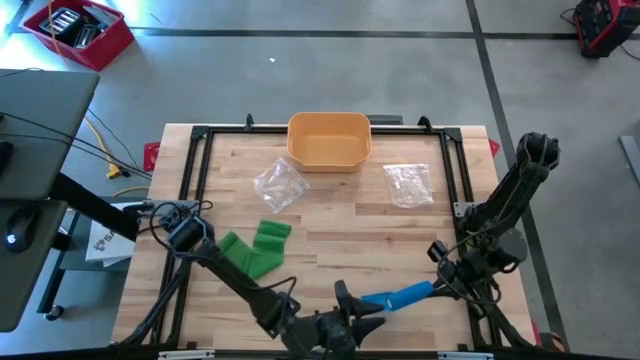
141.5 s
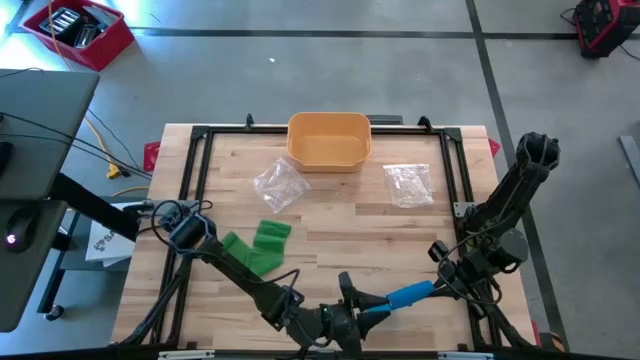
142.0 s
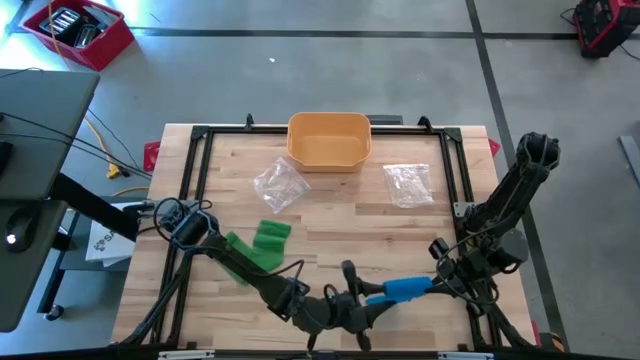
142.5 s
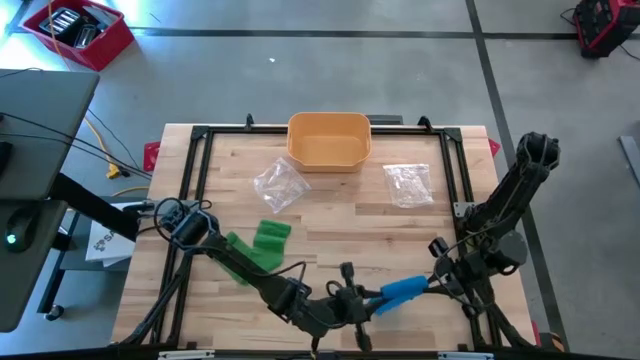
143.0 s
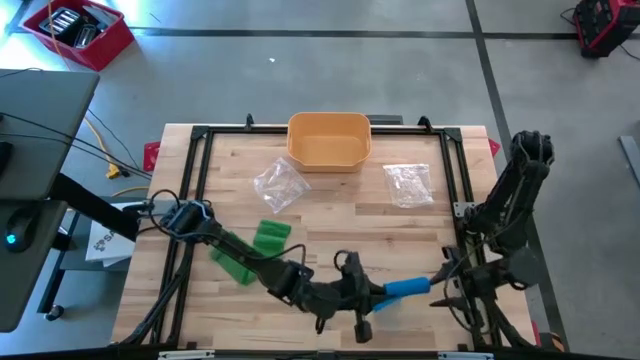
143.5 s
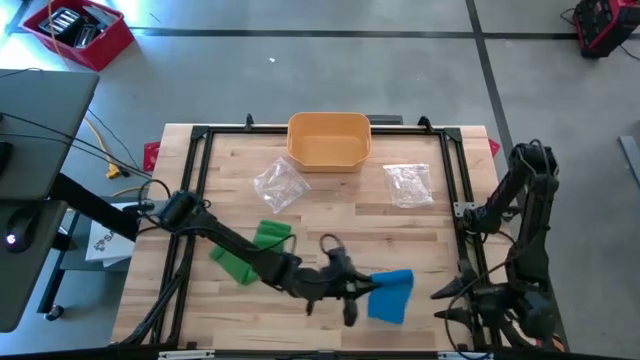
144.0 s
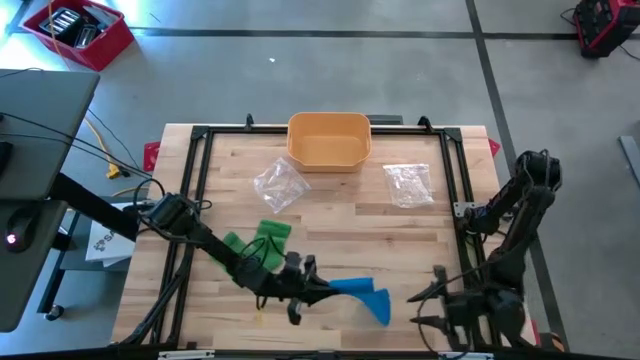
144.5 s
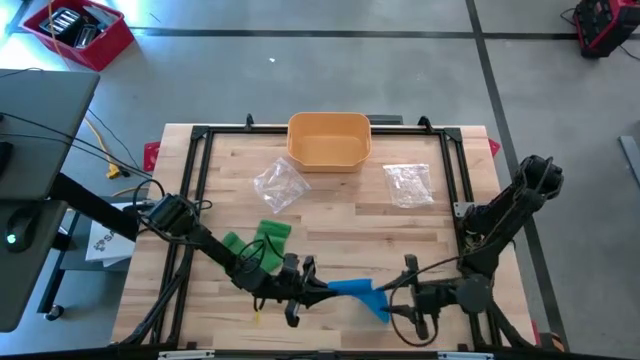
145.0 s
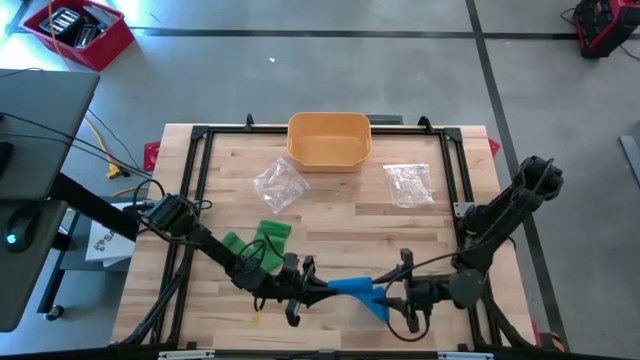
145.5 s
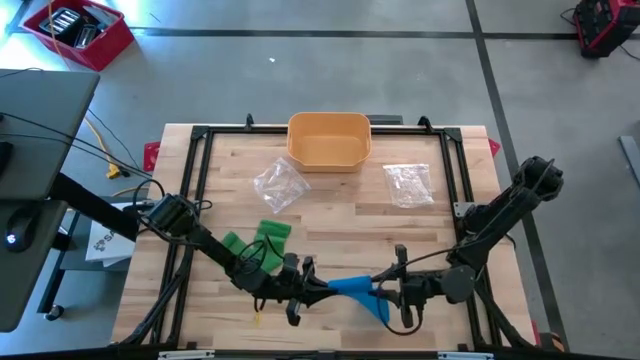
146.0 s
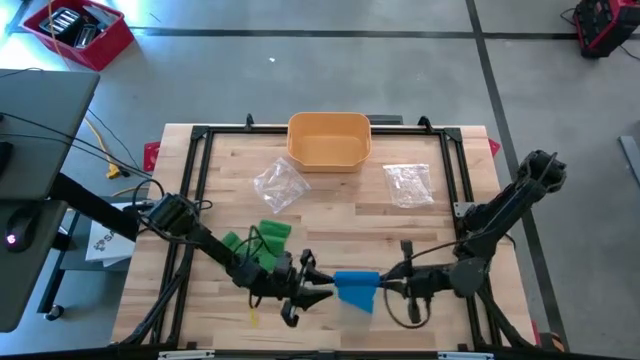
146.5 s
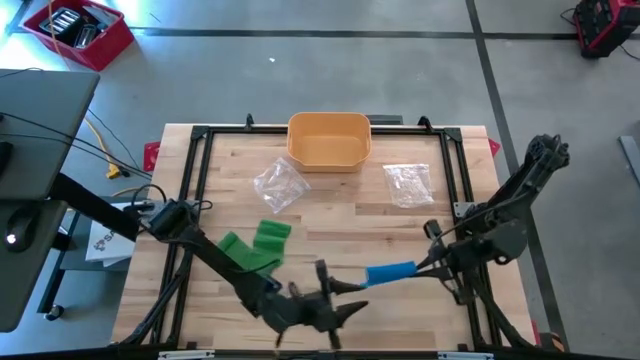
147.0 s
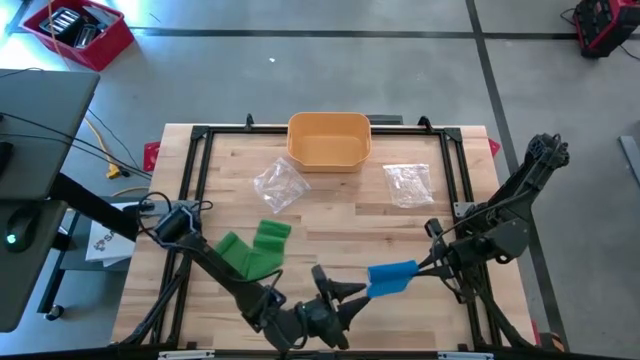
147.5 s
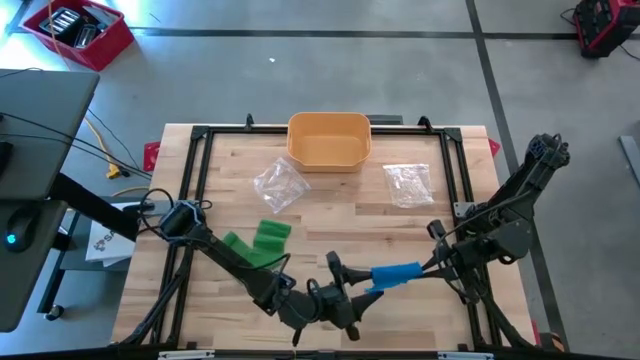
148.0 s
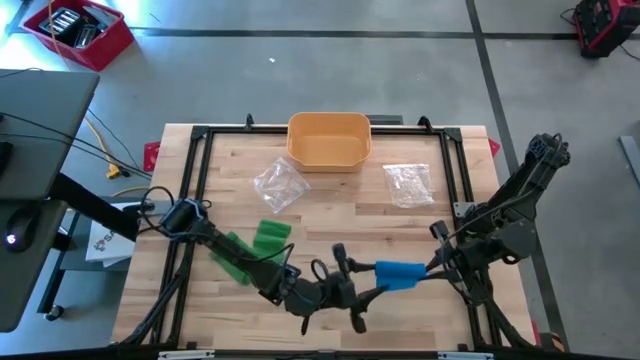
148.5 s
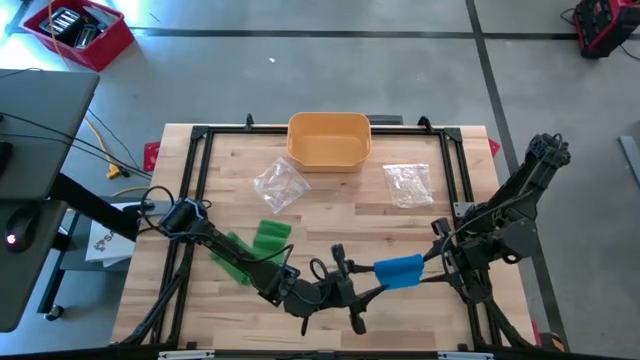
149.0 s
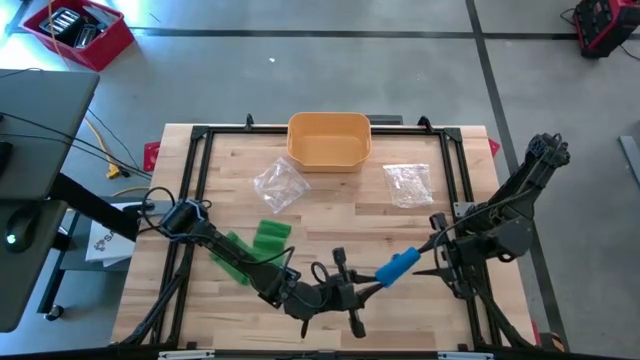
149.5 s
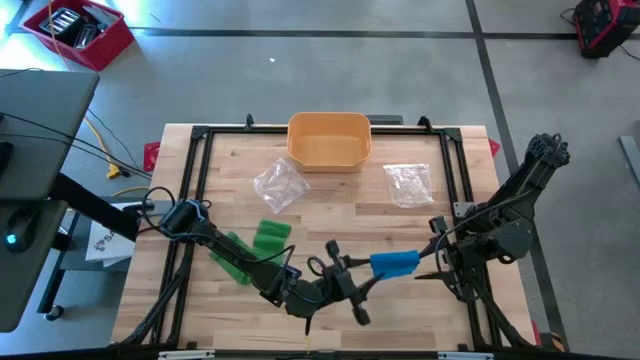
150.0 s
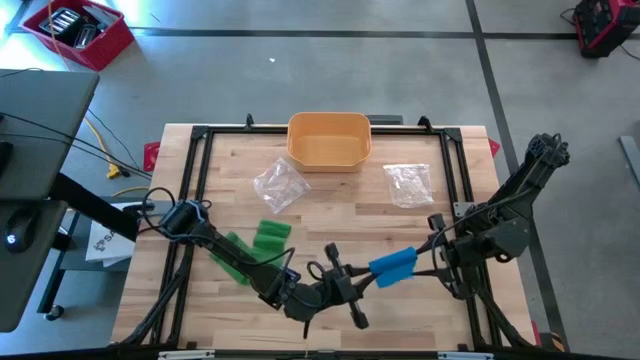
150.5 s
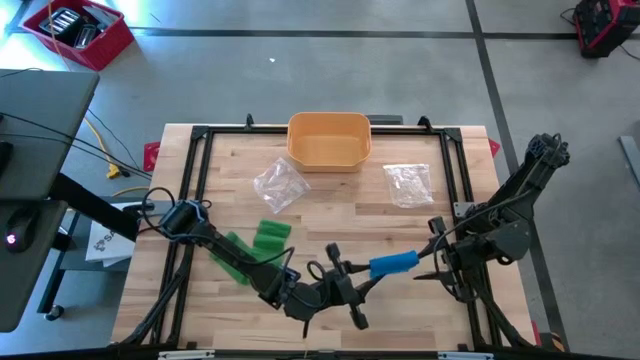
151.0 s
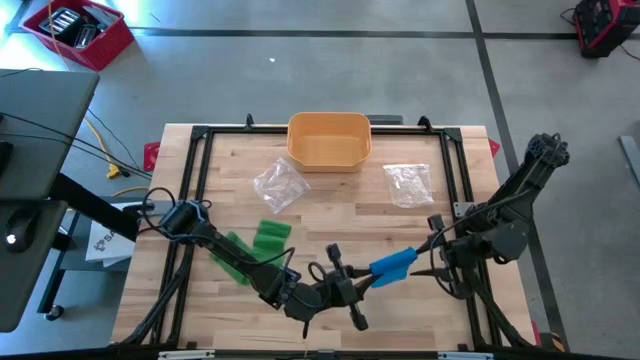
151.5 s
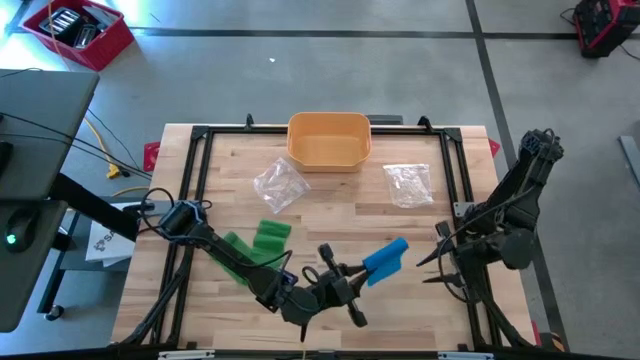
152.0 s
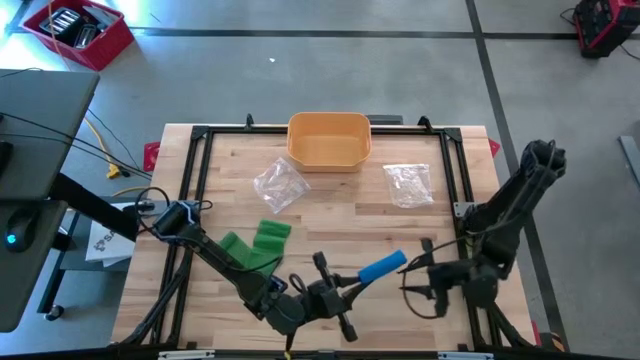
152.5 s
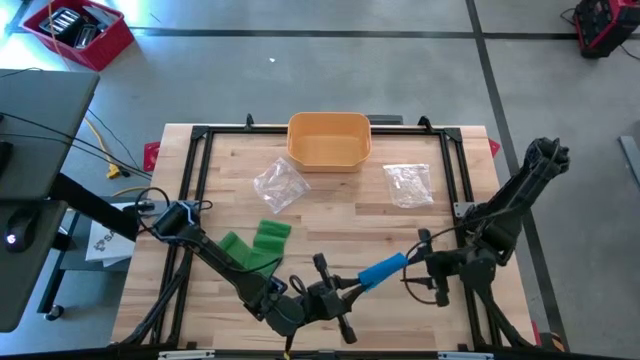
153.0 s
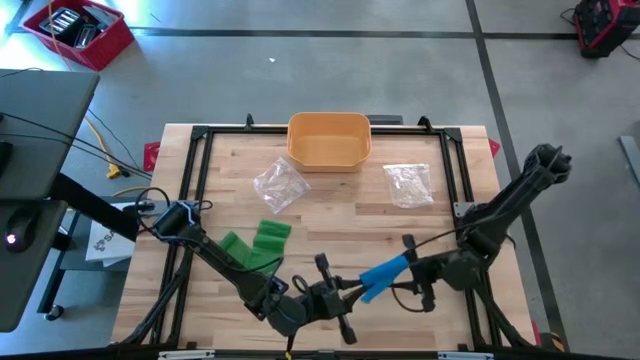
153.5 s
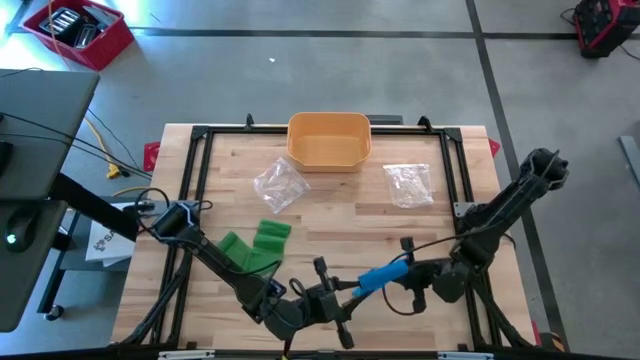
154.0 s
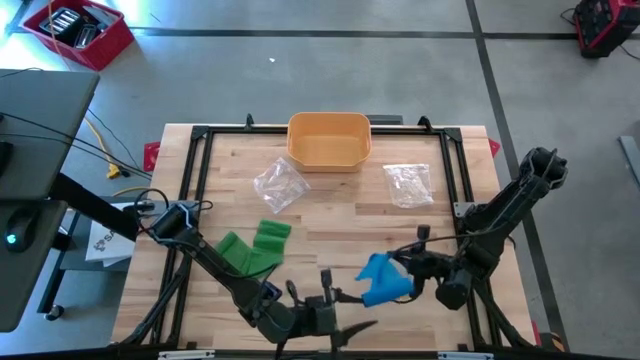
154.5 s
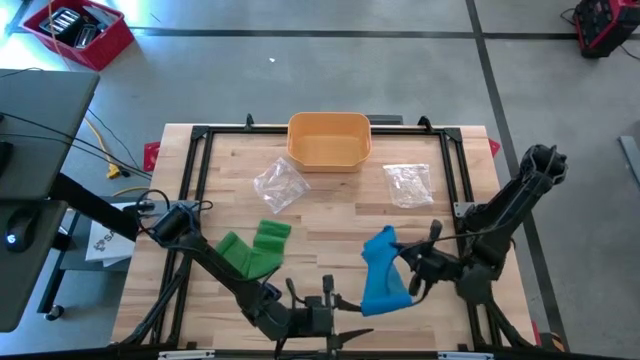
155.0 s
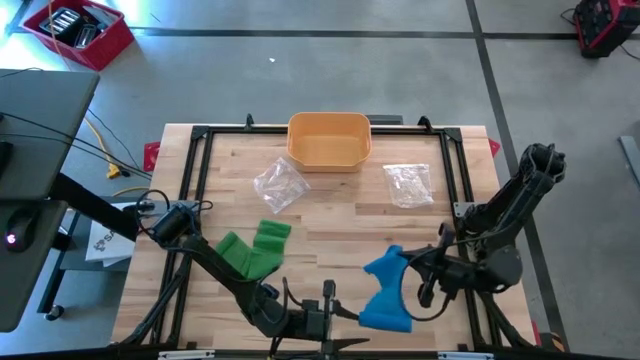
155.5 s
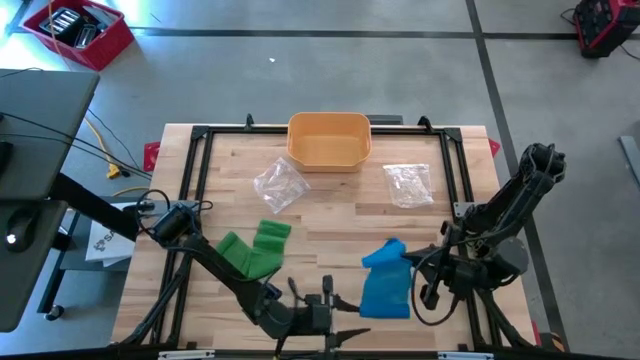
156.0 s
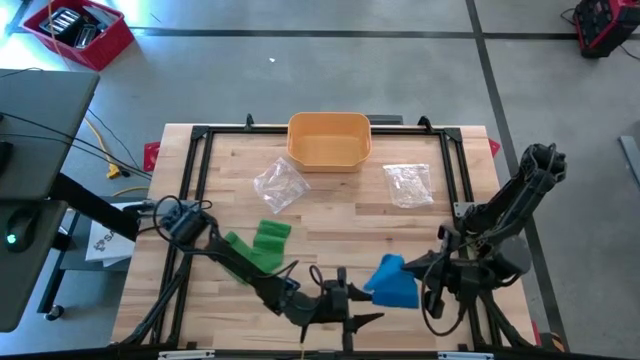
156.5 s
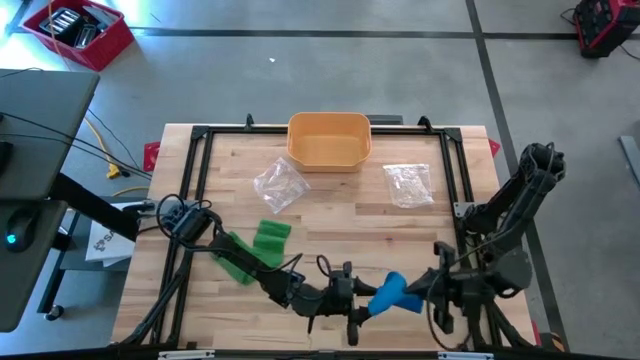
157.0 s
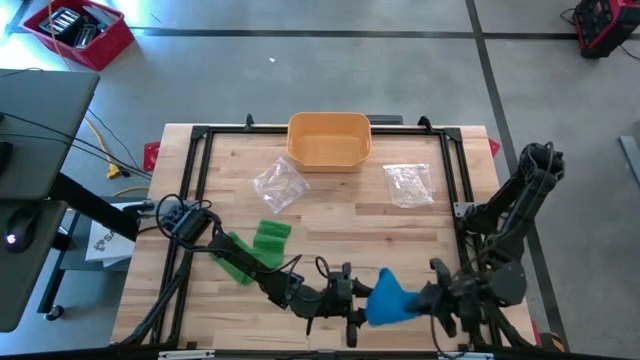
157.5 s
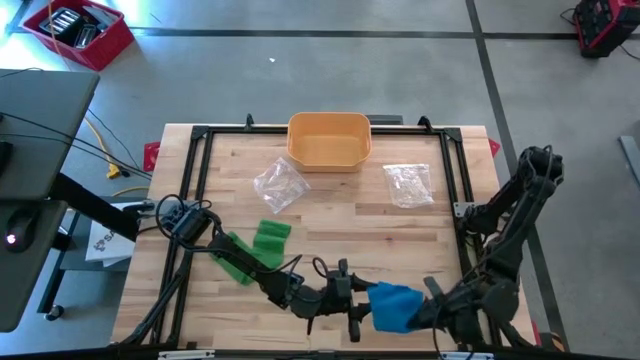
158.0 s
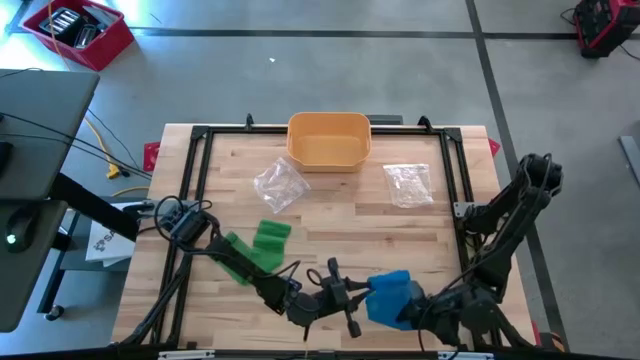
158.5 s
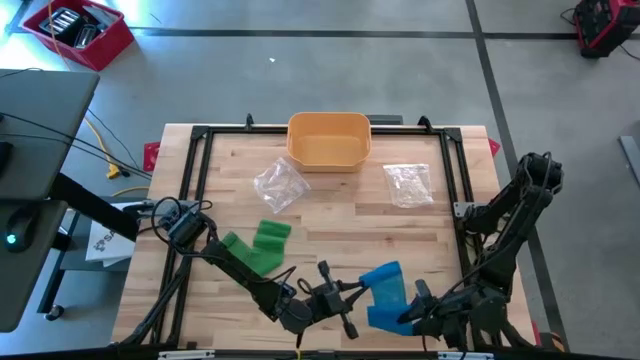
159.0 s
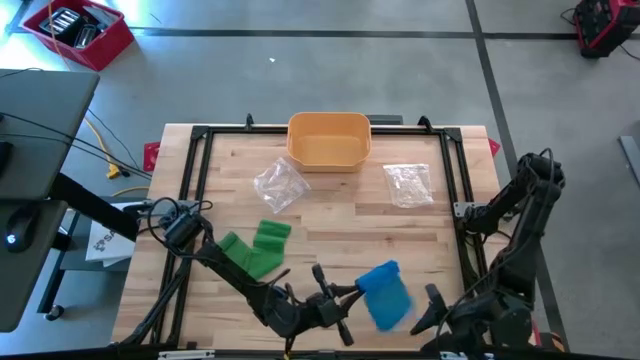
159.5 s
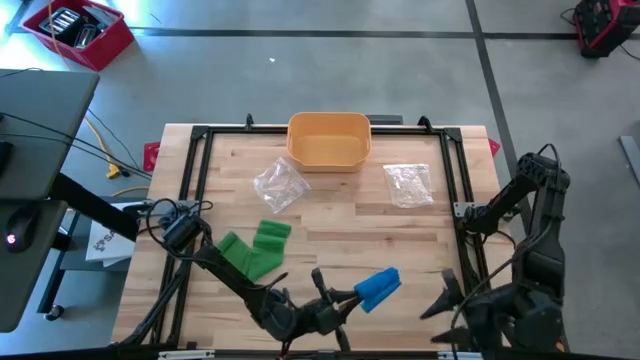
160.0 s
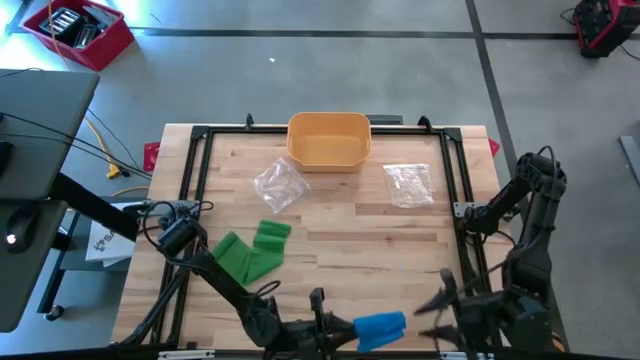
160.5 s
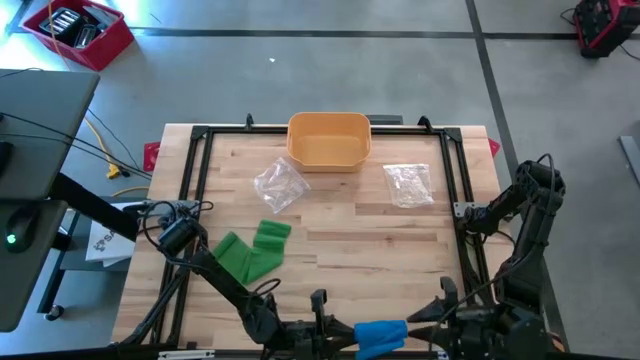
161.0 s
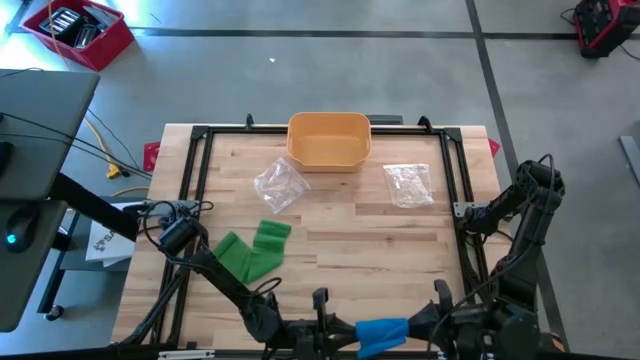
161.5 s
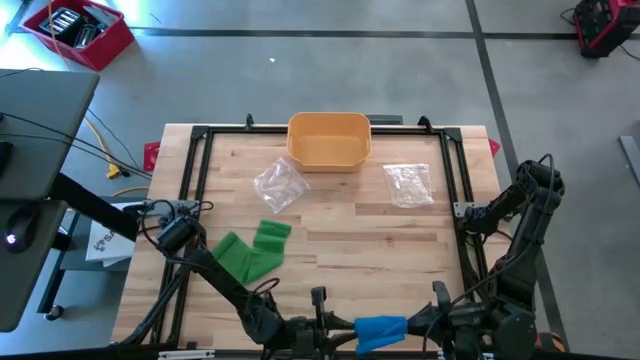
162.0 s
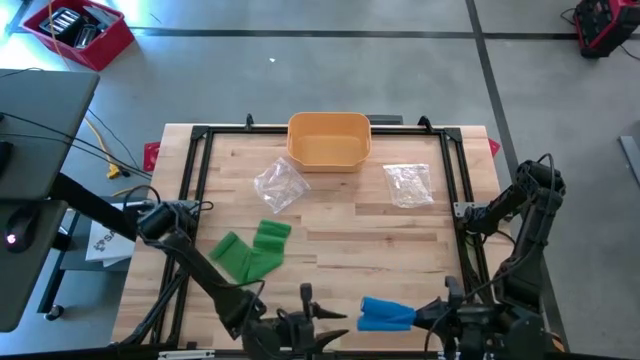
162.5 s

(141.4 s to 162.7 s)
Task: Roll bandage
Roll the blue bandage
